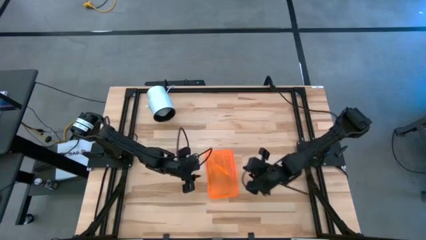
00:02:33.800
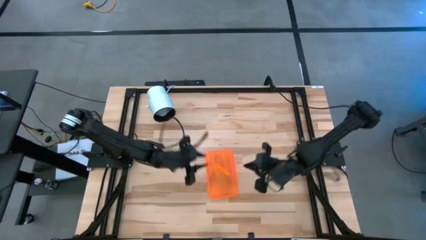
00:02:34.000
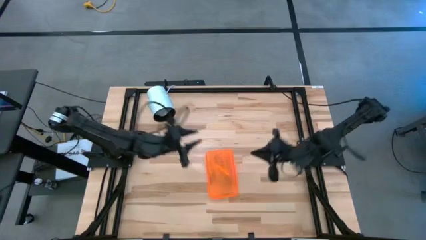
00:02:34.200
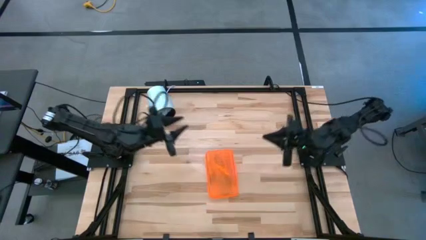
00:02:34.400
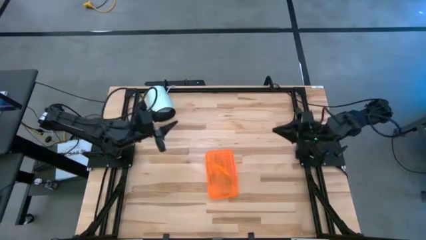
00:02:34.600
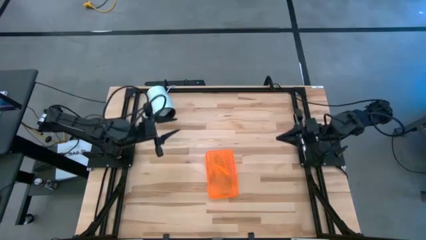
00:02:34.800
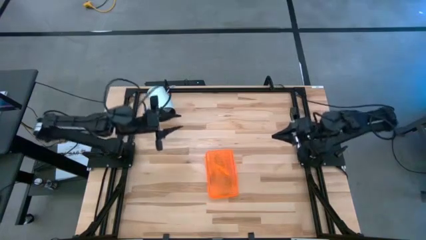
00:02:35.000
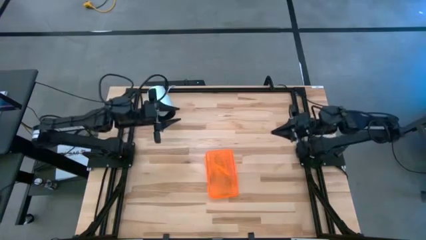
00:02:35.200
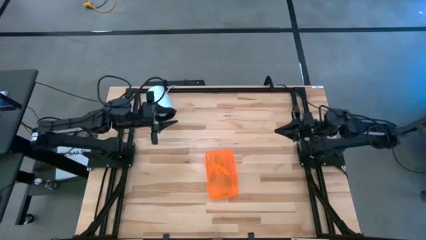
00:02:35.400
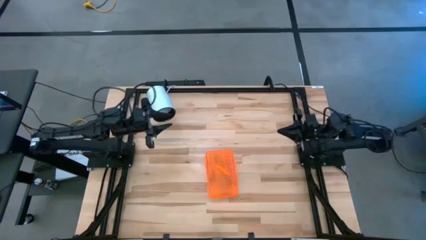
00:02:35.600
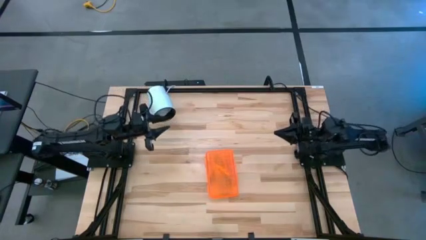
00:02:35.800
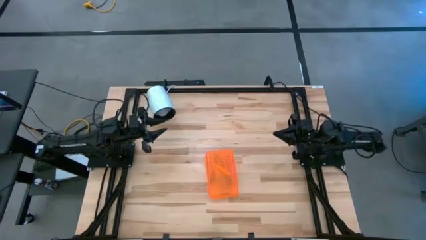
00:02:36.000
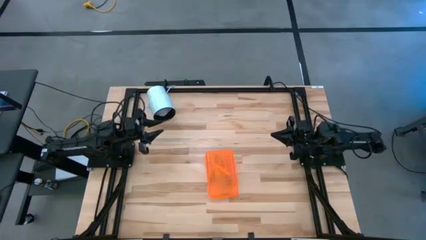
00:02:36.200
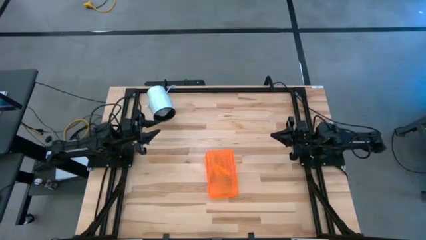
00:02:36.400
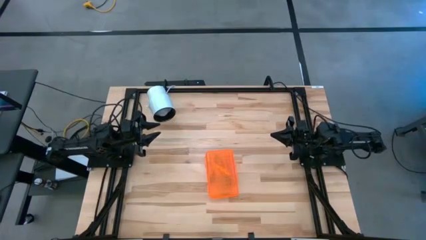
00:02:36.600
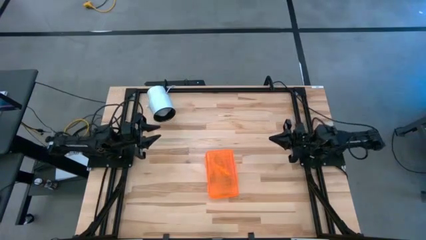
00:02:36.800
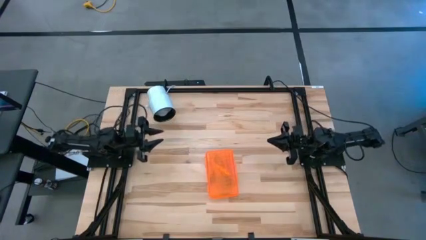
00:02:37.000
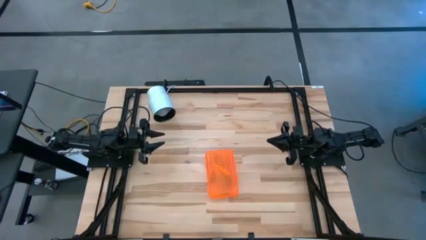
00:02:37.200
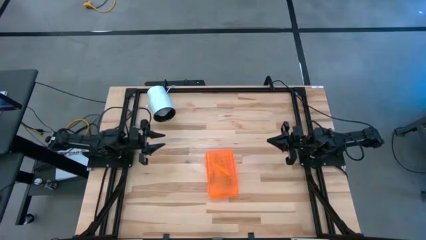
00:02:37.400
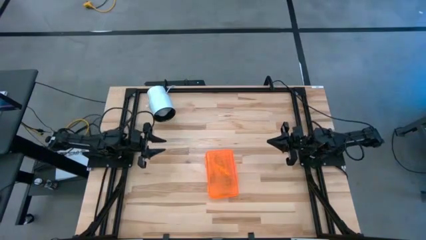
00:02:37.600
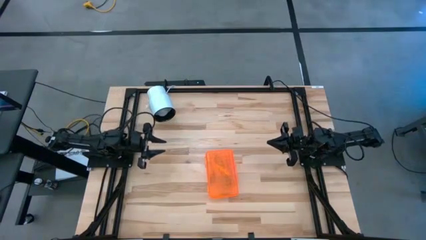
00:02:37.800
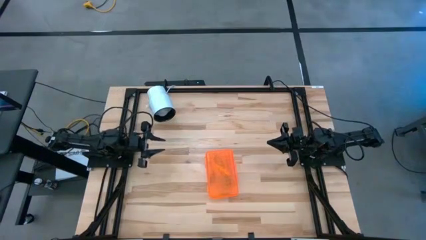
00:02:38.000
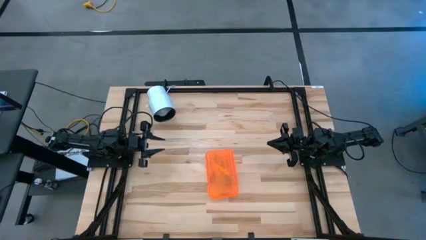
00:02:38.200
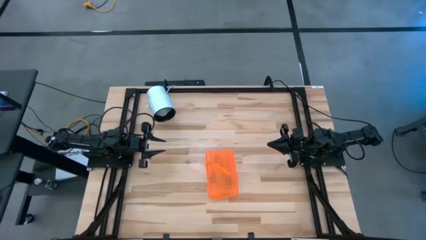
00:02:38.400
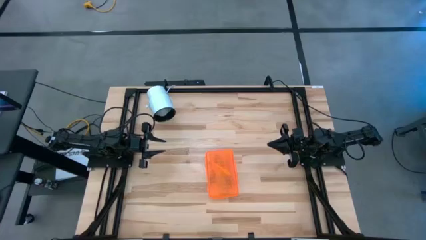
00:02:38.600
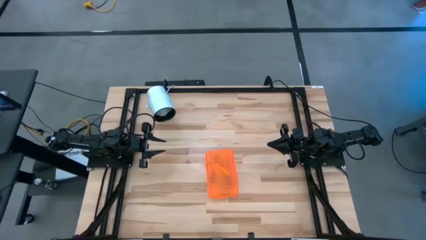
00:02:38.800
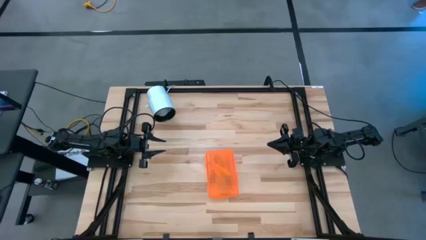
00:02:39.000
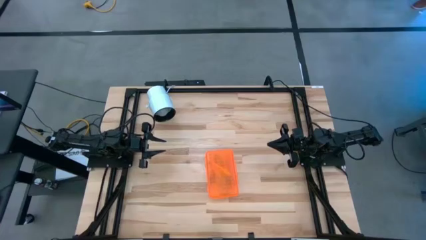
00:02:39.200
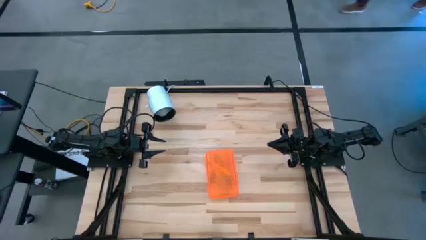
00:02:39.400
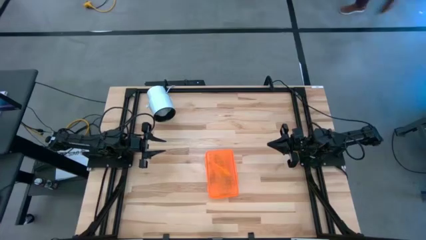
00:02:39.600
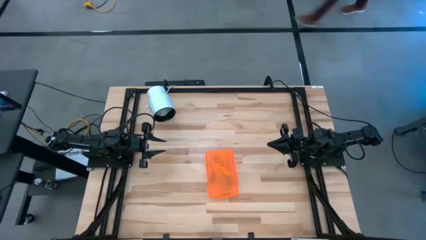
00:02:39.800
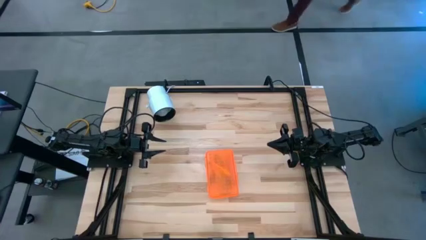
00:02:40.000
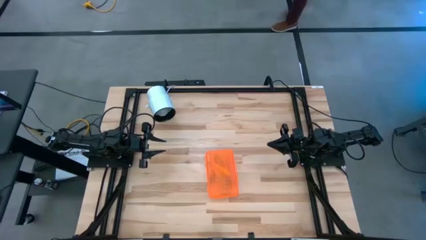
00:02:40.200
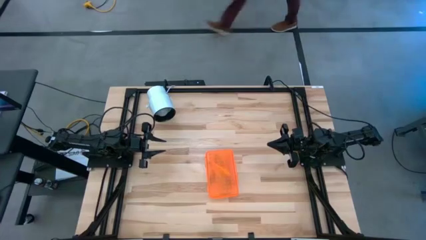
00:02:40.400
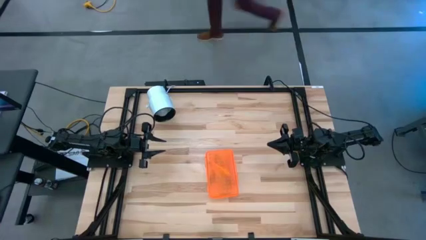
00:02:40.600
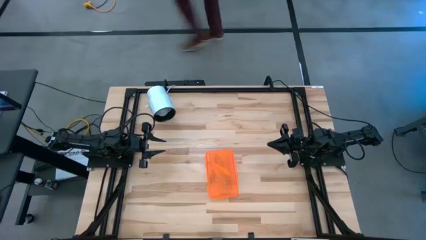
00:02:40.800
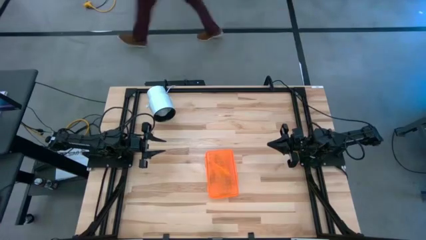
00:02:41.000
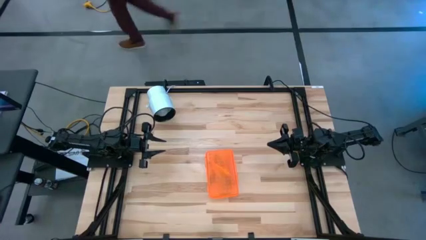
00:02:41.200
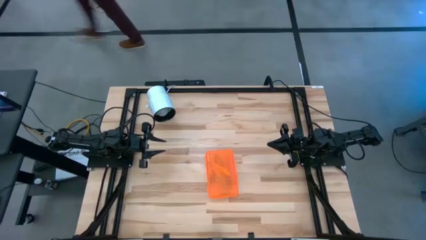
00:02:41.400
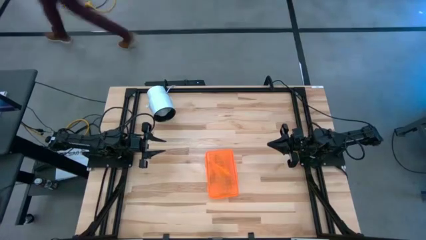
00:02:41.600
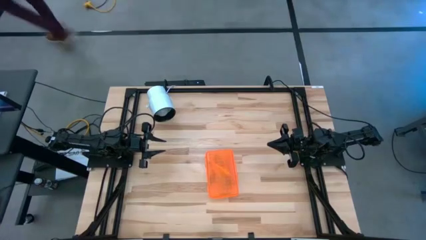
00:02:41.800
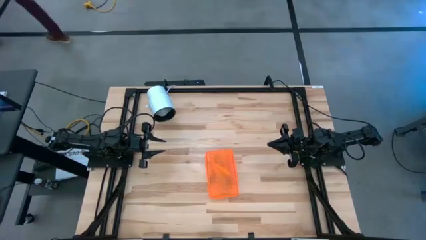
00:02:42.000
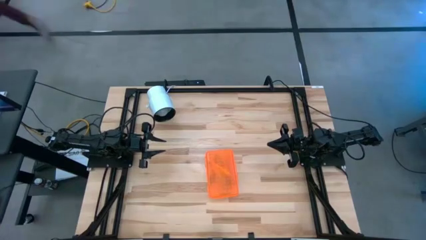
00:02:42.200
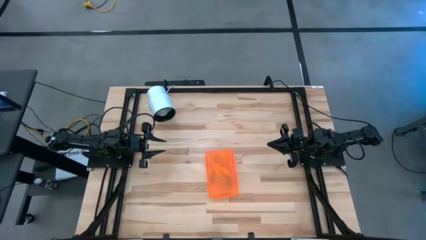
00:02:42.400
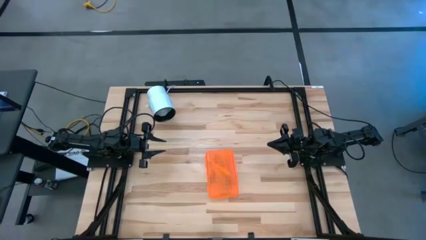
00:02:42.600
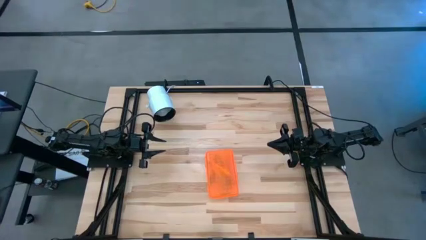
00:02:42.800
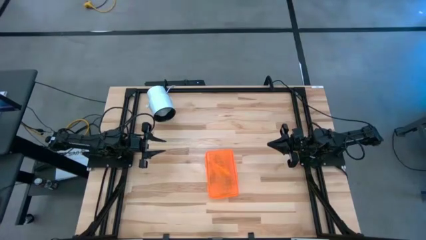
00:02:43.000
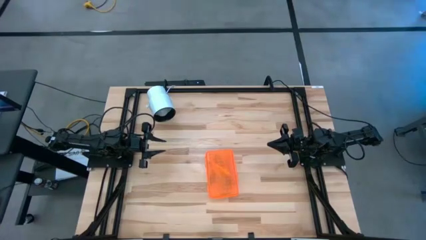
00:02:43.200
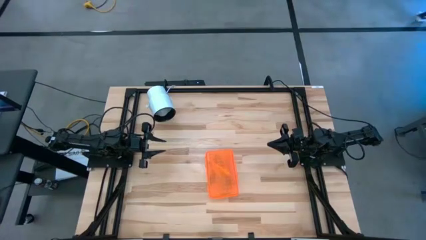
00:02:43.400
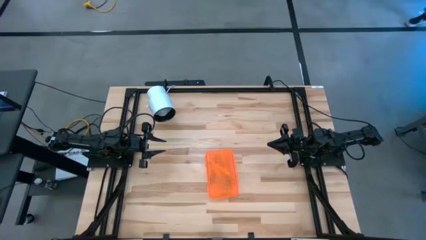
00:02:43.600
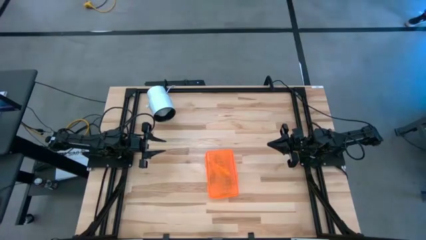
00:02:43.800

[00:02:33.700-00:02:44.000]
Task: Pick & place school supplies into a supply box
Return to Home Position

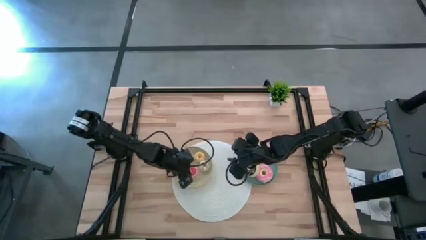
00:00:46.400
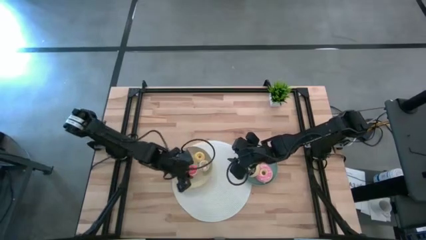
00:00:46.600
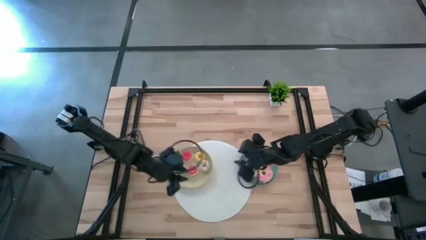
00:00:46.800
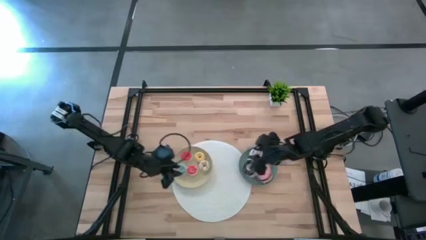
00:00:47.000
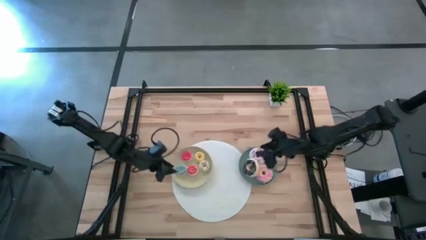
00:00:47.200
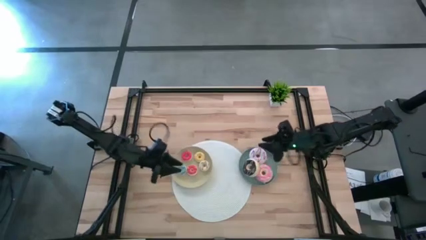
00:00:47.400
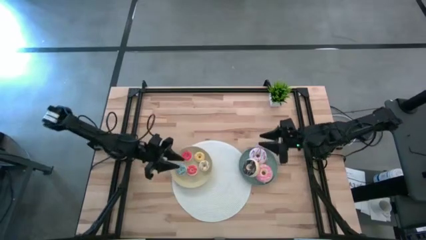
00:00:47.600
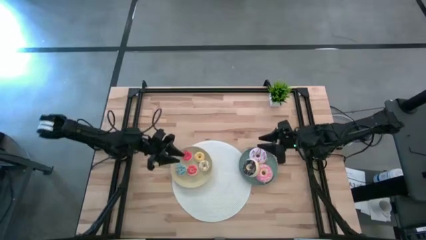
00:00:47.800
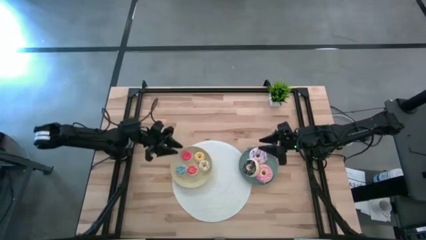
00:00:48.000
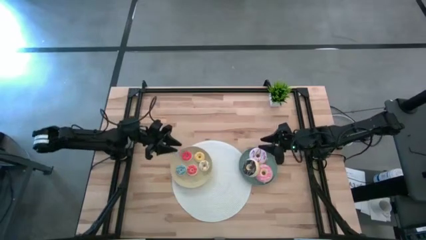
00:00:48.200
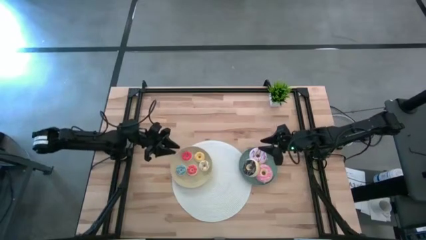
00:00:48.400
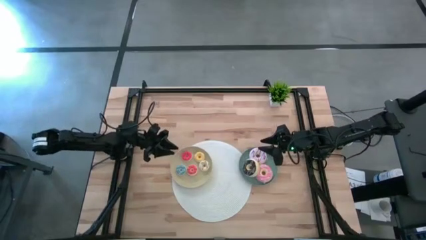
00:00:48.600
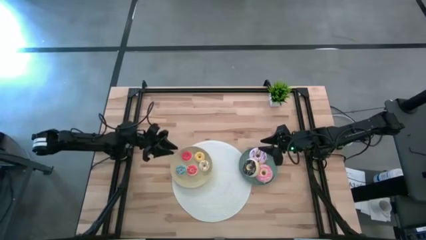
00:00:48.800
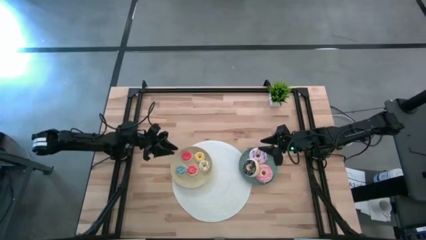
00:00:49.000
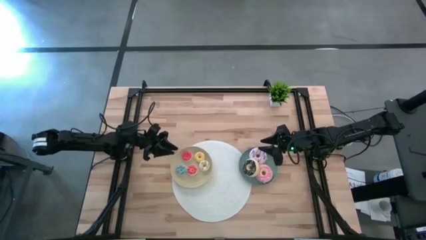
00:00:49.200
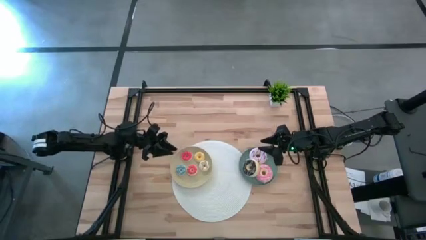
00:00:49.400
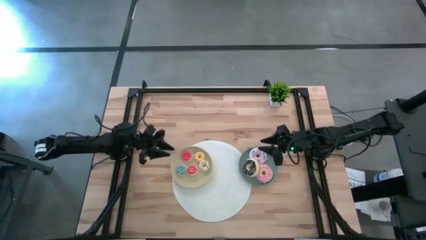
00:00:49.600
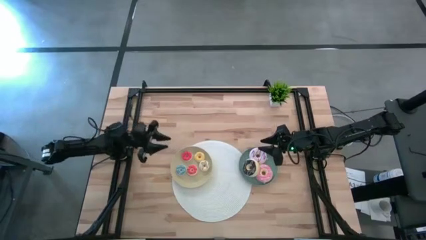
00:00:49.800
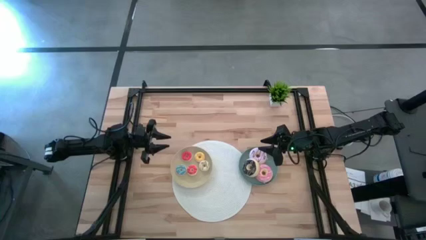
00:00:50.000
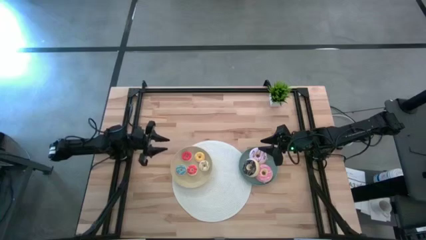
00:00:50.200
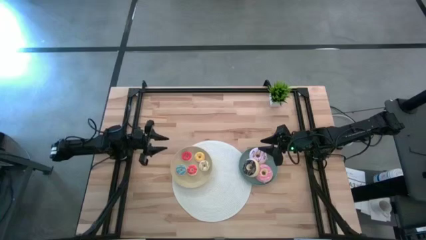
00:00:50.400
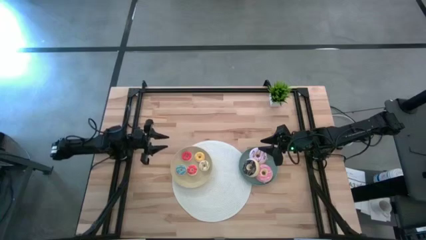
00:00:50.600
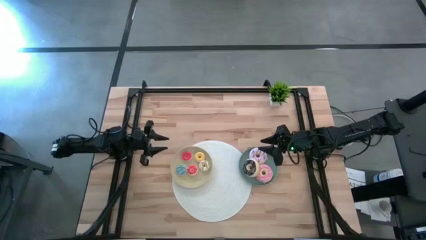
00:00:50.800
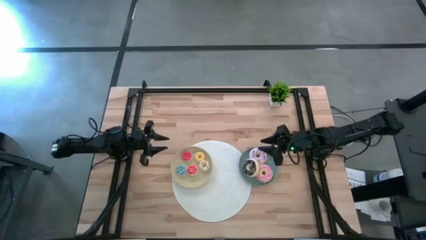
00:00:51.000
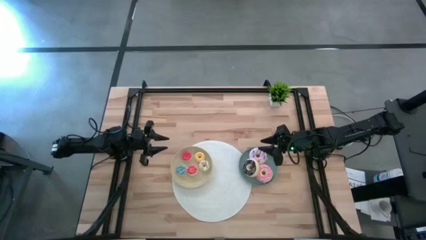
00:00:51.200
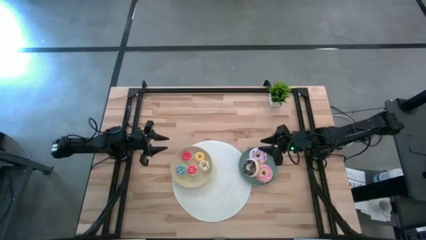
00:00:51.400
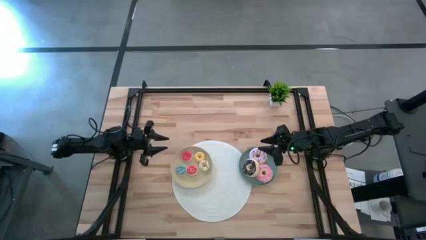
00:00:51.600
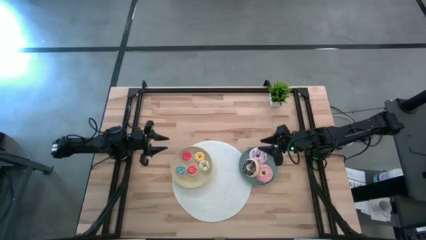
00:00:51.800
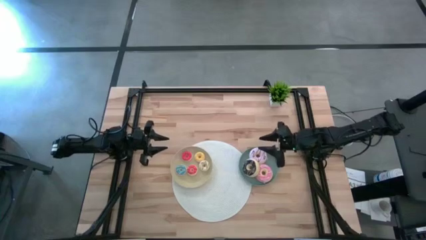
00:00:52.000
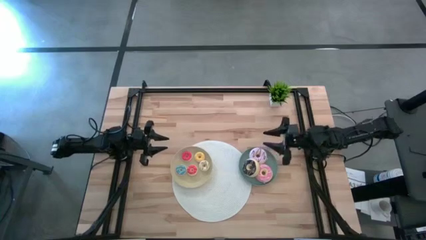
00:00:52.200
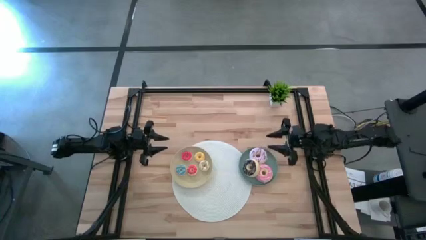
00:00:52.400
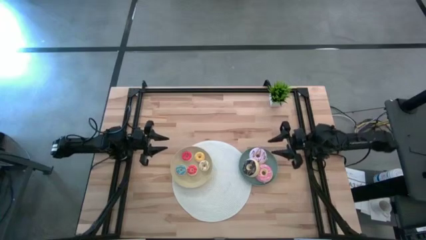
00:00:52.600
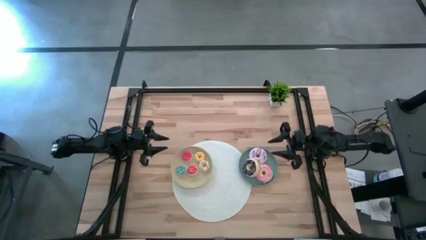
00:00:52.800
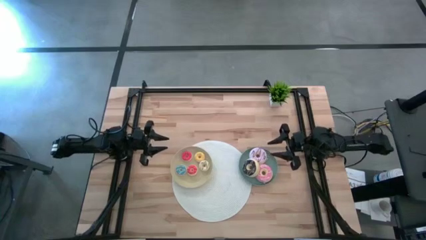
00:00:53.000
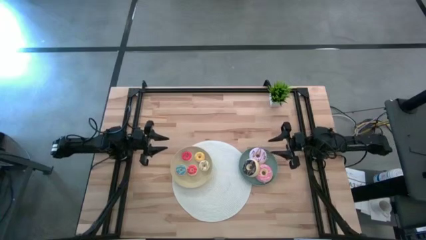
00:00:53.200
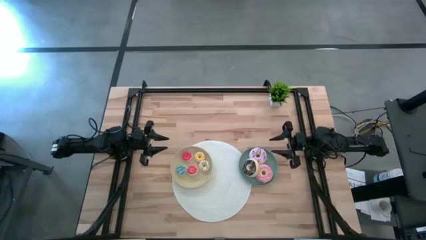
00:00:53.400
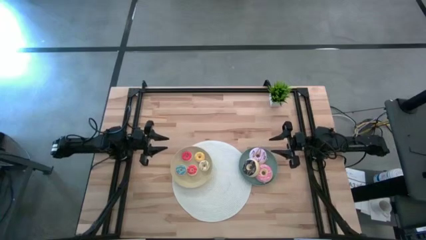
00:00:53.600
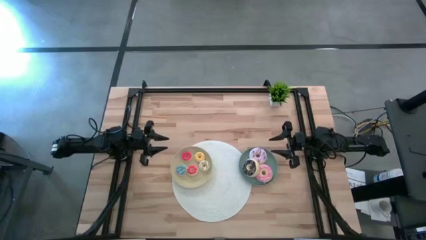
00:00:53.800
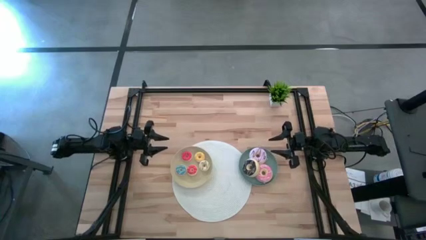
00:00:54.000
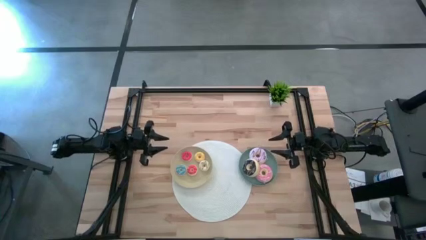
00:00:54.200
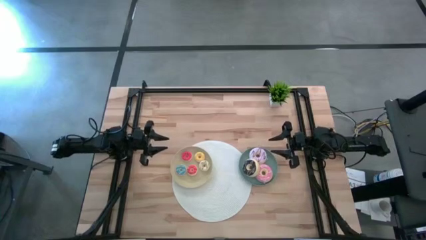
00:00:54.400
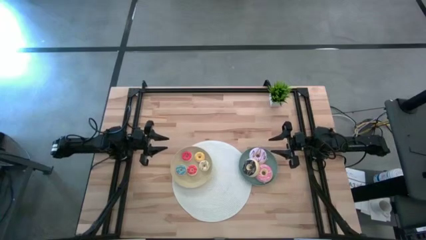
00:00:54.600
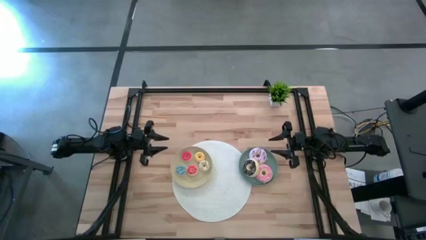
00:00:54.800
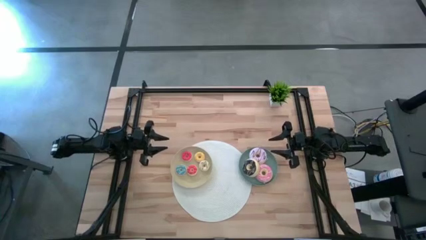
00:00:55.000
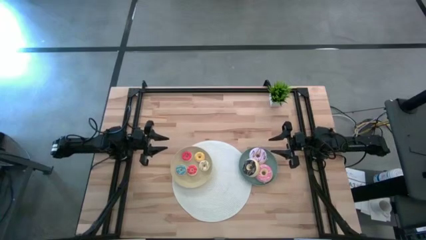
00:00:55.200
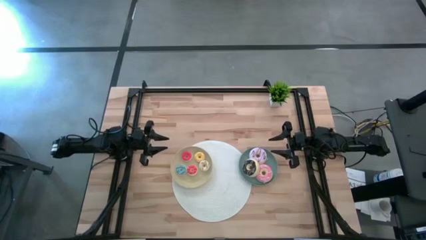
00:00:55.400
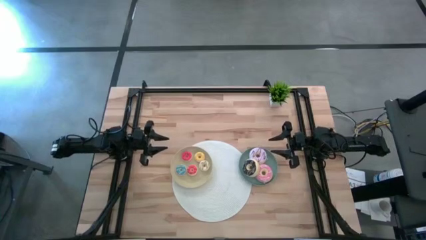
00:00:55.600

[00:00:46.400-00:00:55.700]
Task: Pick & Place donuts
Return to Home Position
